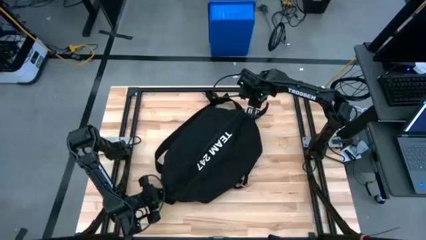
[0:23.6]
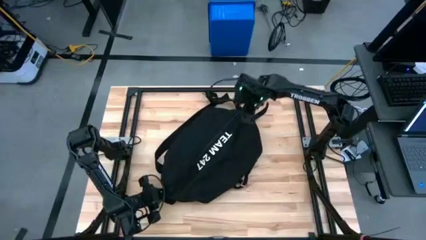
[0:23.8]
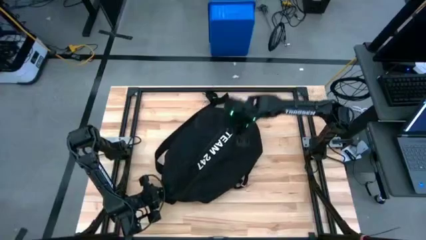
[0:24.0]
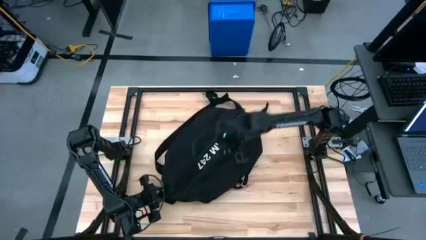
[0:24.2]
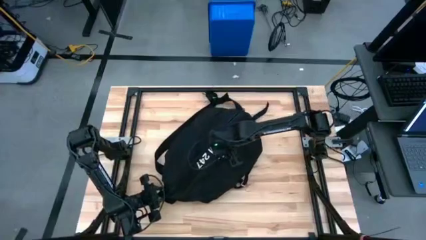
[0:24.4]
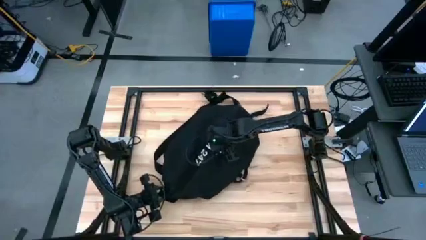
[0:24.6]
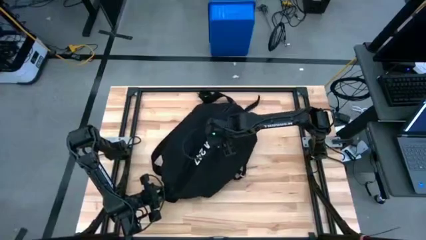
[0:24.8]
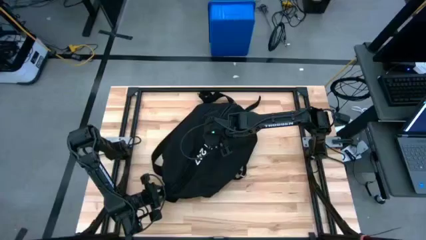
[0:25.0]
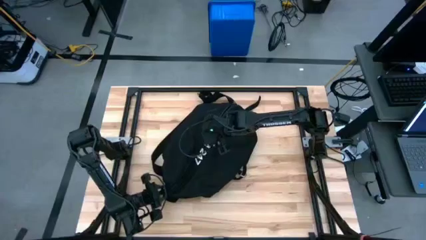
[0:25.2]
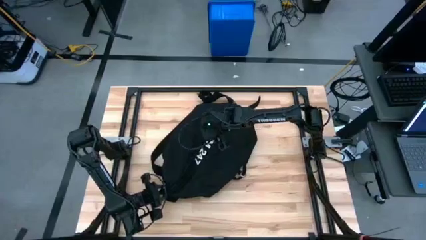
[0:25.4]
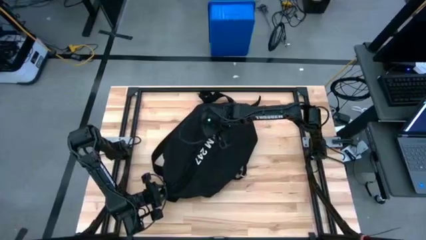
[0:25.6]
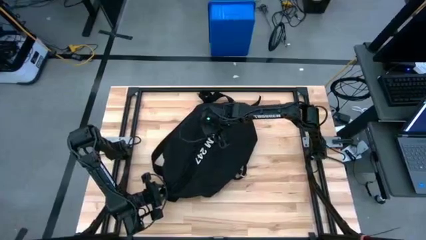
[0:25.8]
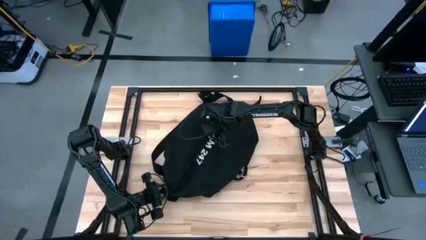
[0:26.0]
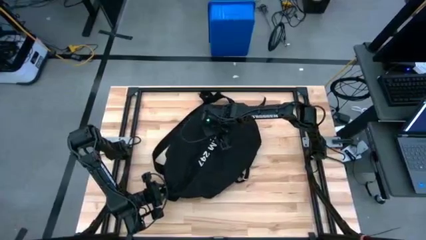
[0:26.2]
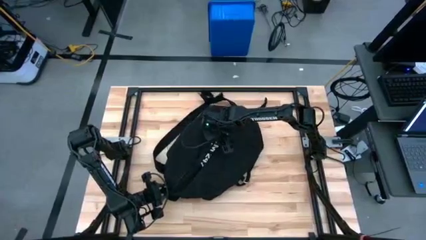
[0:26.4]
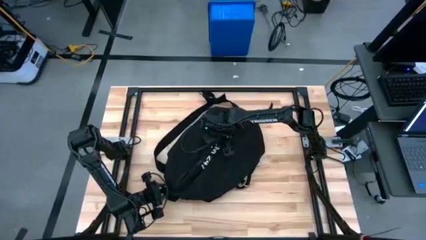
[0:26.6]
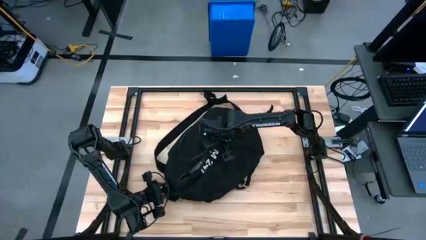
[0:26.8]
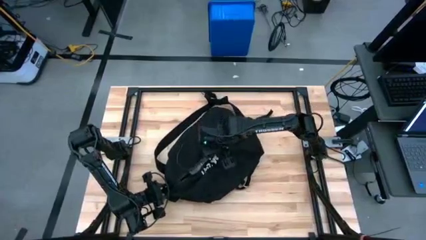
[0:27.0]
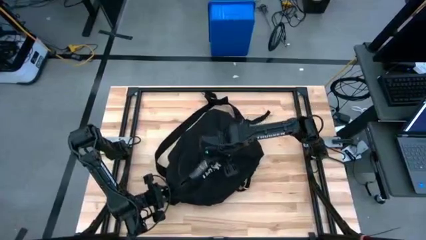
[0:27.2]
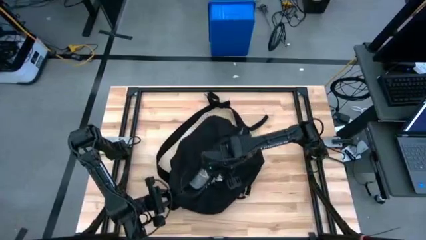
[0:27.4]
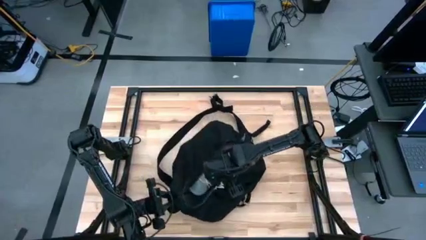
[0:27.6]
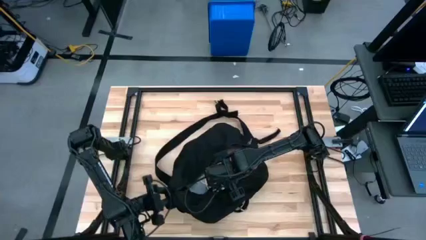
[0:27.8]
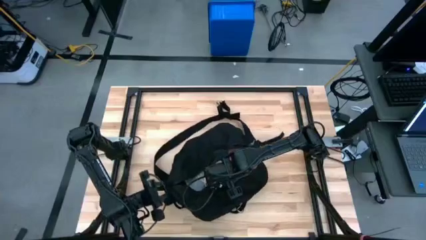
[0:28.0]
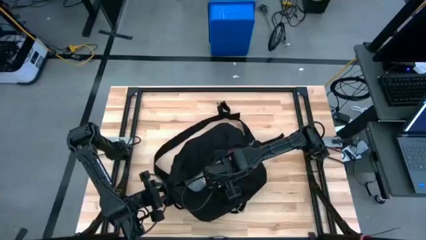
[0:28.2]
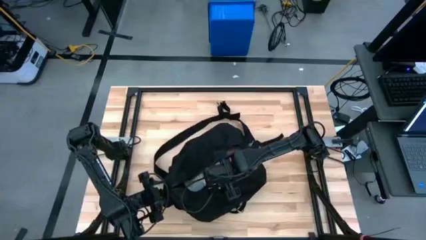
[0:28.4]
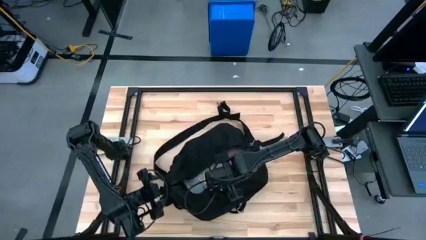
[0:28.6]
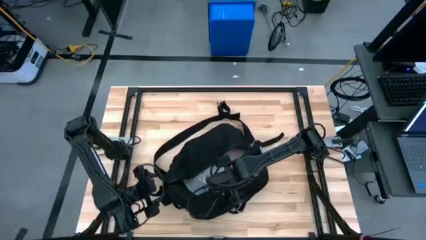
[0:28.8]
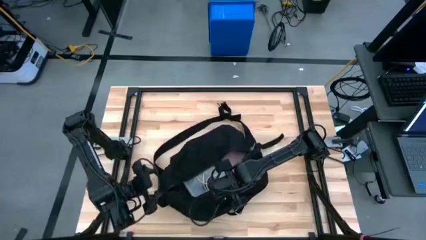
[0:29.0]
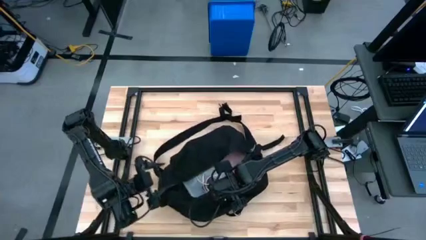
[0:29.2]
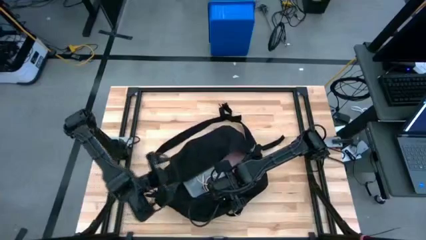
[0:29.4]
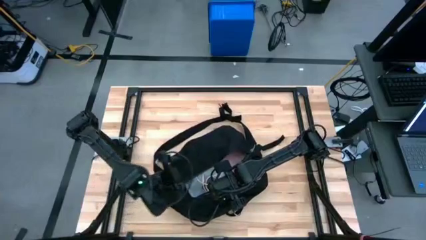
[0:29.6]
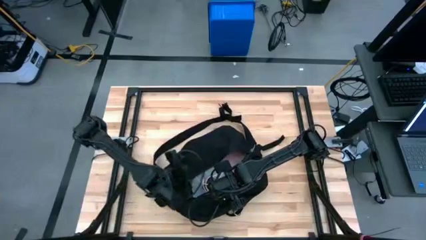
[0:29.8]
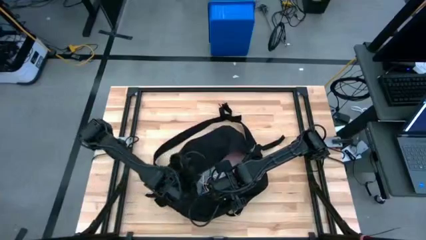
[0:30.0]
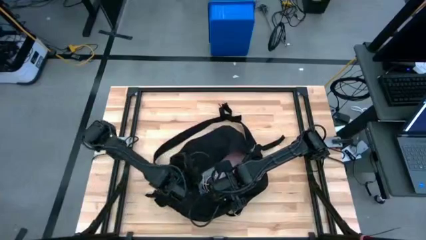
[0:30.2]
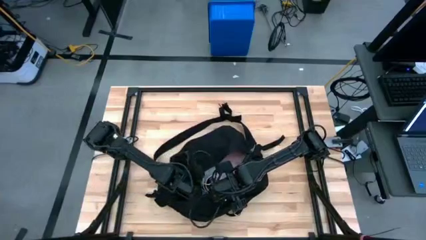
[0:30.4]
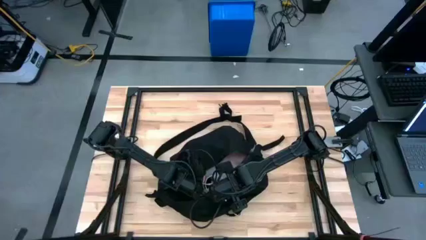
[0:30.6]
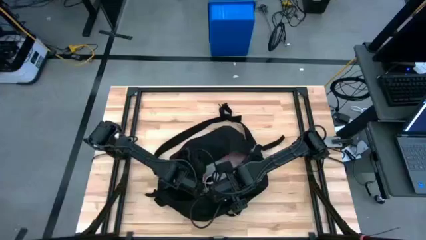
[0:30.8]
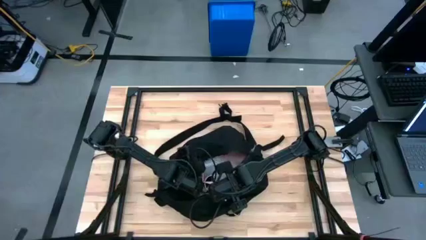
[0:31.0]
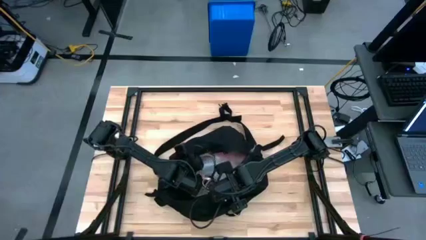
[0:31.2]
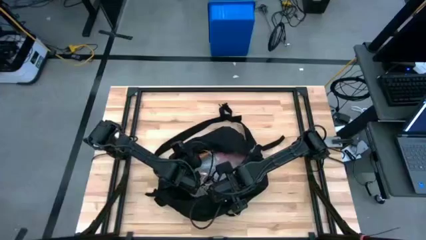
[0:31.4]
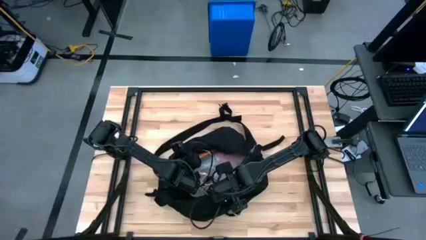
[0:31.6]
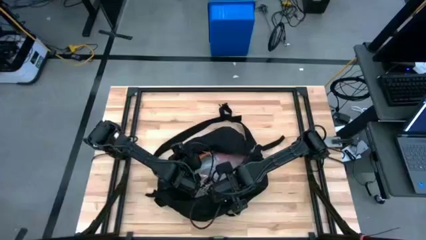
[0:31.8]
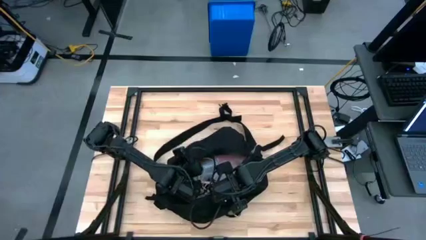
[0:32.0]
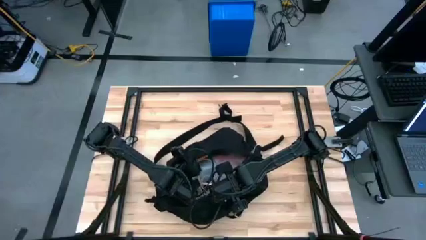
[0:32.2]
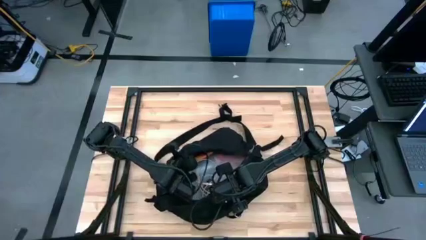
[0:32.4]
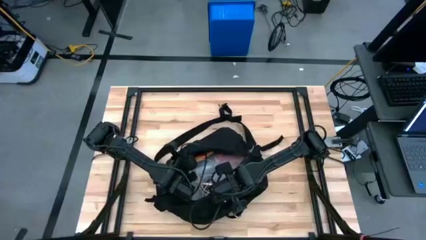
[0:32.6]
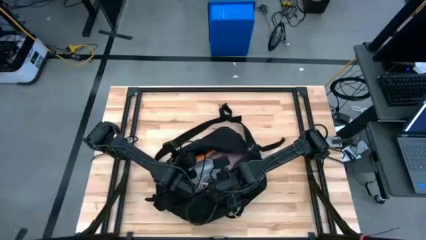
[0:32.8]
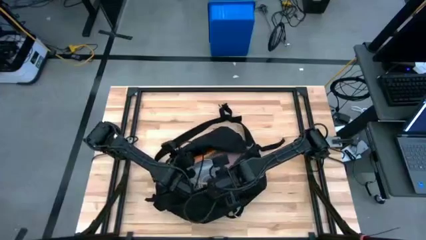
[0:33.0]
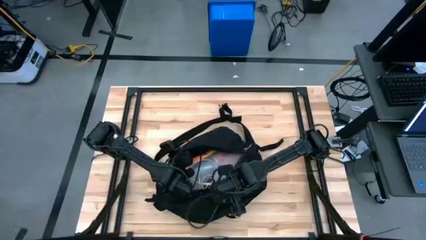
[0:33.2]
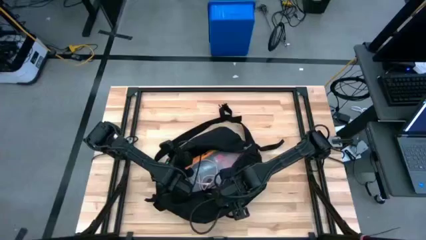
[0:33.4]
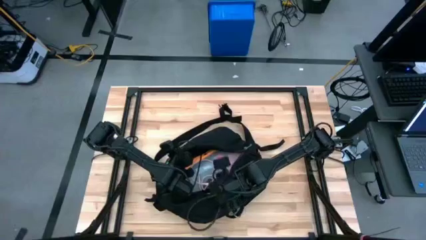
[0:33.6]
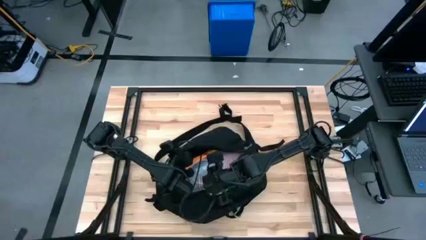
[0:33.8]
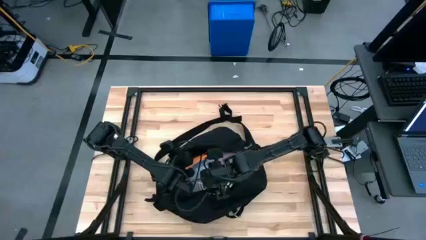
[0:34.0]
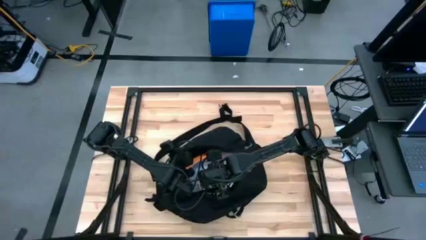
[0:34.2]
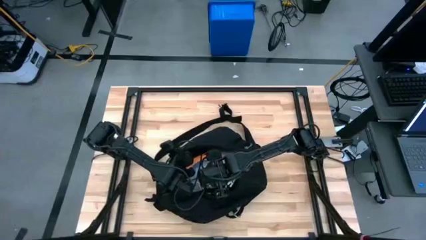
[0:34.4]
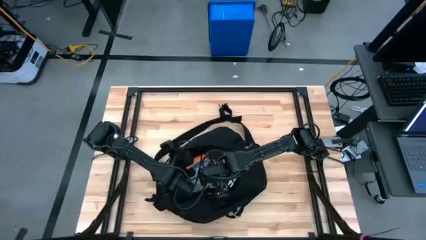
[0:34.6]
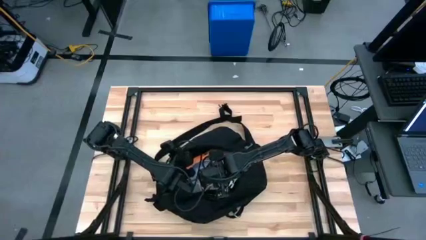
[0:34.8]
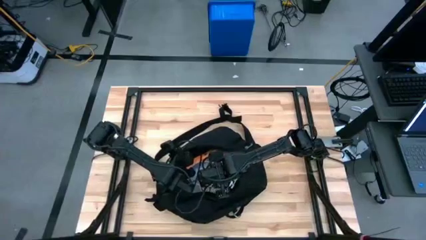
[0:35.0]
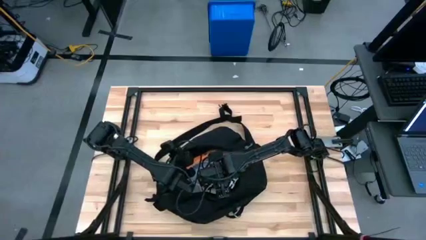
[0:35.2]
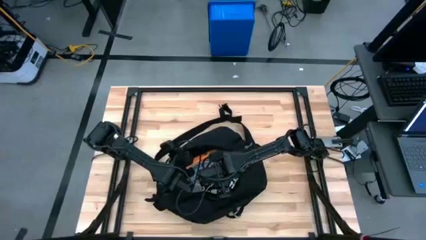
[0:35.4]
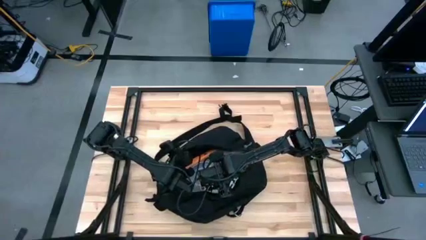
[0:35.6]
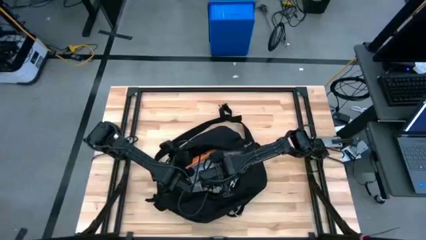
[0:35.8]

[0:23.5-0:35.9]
Task: Unpack backpack
Remove the pink charger cable form the black backpack

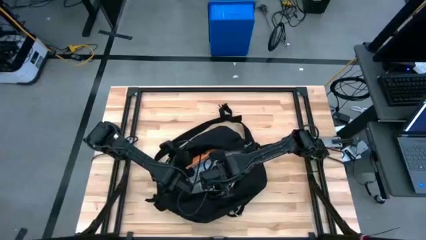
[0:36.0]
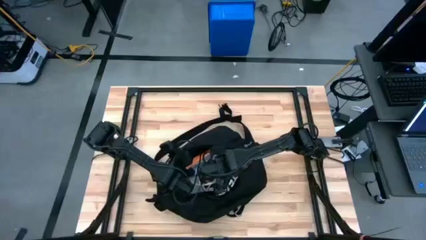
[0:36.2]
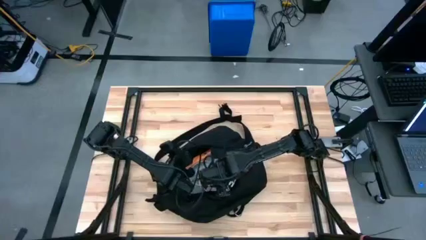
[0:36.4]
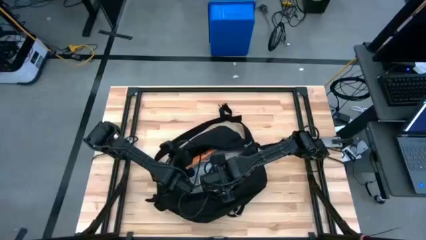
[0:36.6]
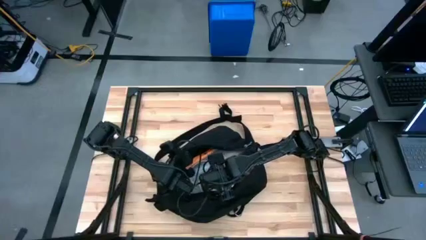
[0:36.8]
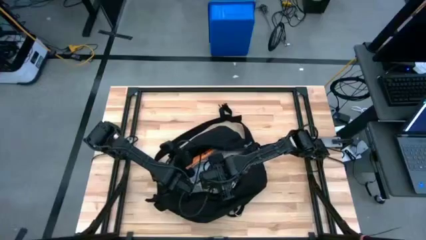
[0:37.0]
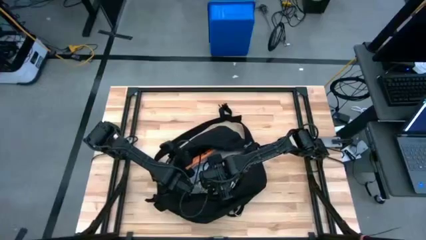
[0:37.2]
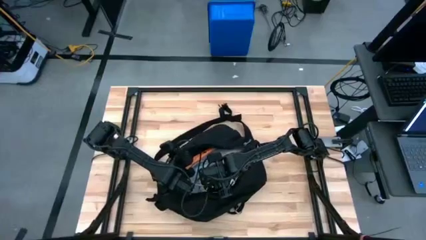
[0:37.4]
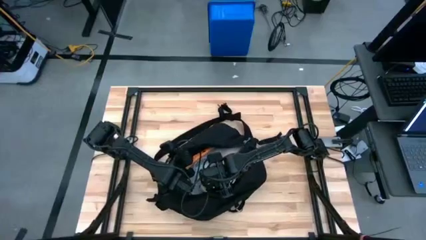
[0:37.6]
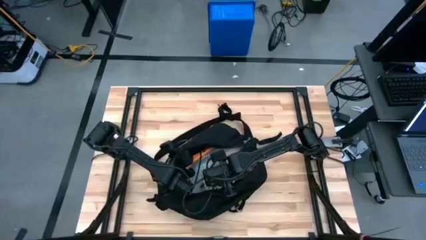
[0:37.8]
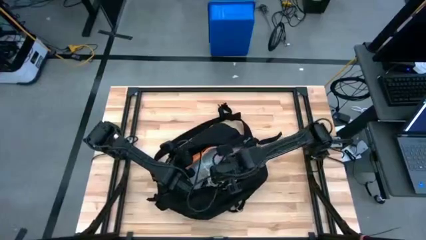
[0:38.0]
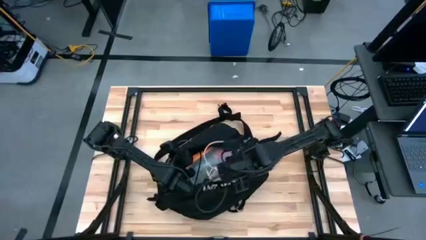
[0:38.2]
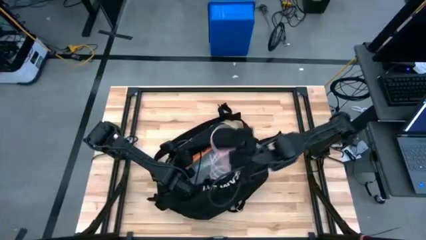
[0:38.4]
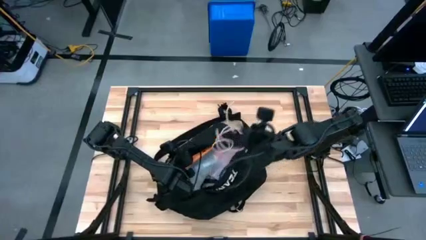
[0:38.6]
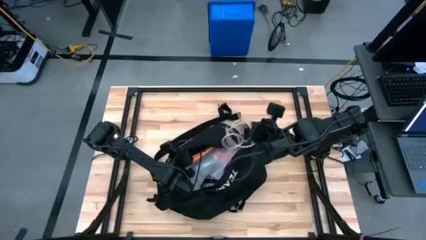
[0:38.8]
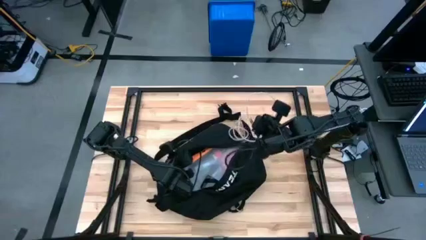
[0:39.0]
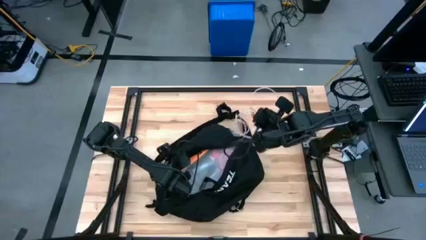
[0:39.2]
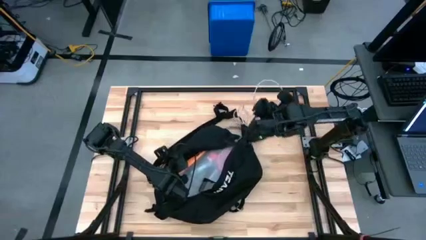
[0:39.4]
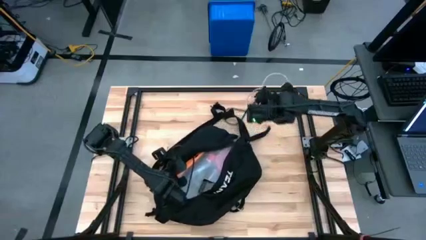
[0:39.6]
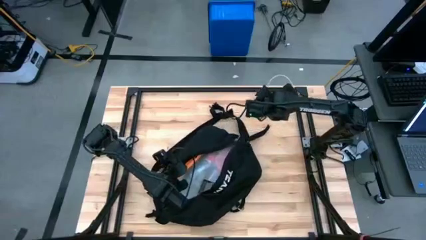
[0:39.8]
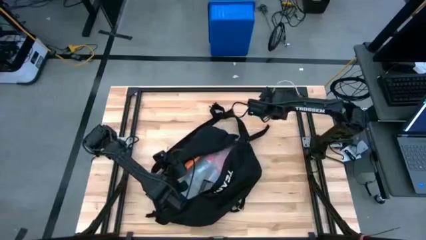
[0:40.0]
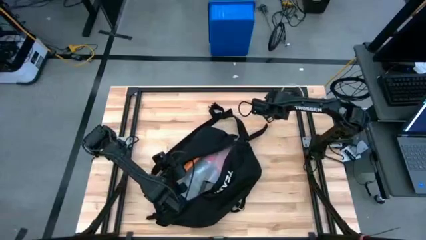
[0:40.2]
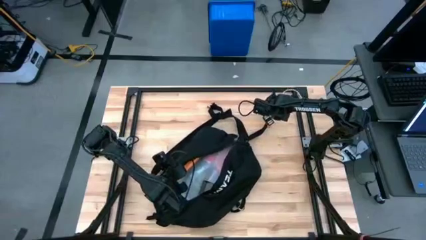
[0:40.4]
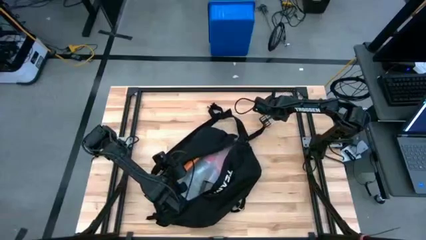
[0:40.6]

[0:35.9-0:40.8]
Remove the pink charger cable form the black backpack

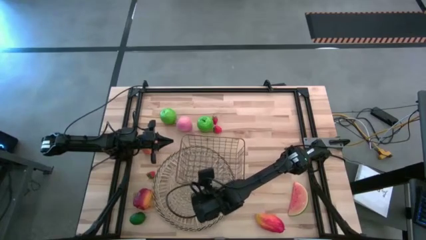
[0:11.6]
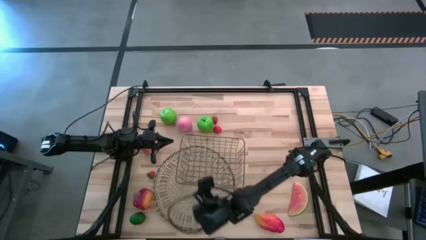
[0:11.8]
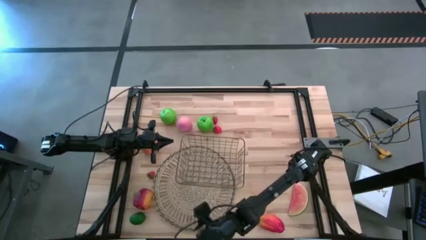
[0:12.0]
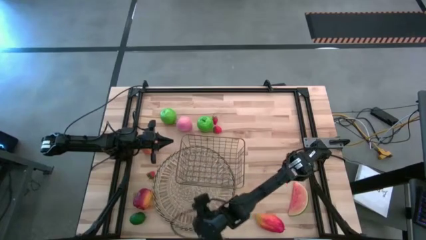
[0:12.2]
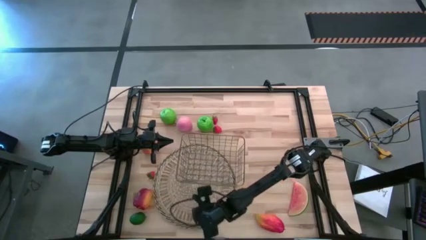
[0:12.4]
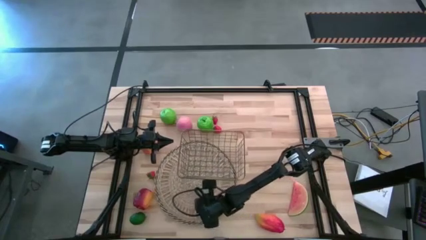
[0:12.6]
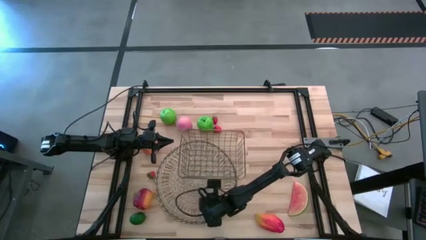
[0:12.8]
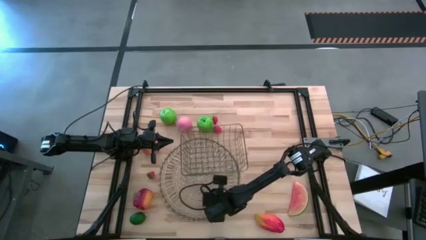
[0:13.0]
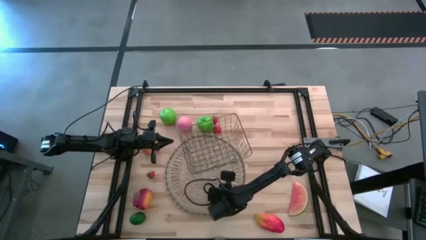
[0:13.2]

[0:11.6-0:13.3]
Task: Build produce basket
Adjust the brown mat
